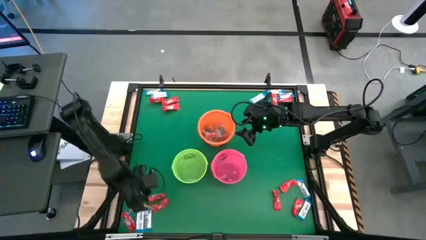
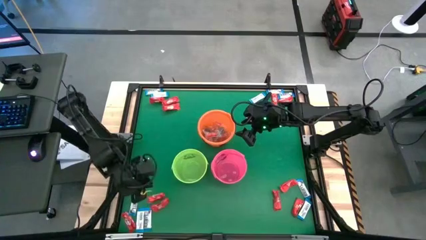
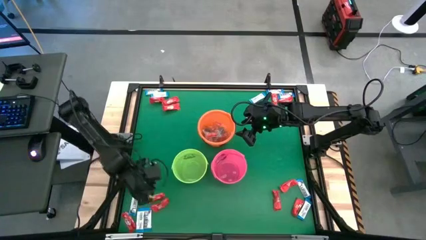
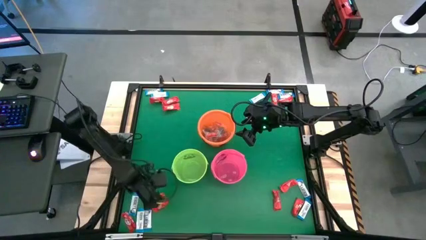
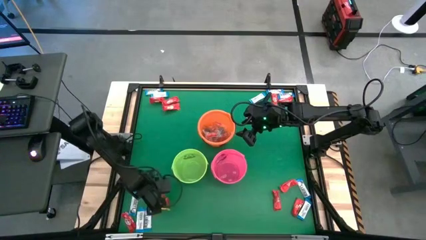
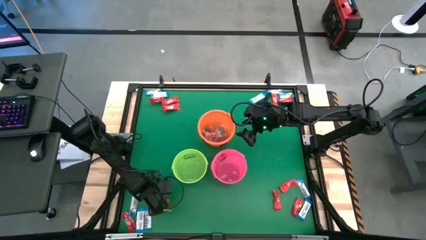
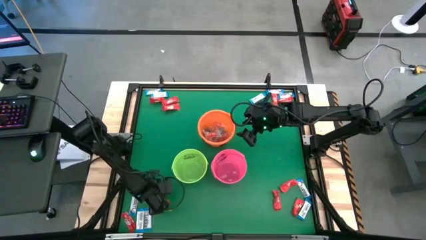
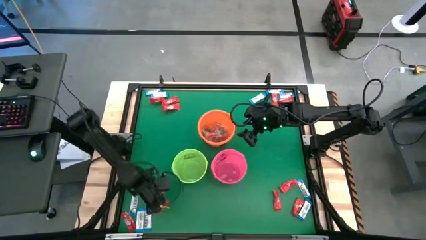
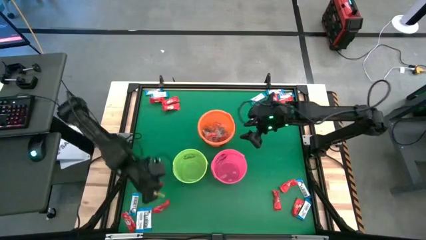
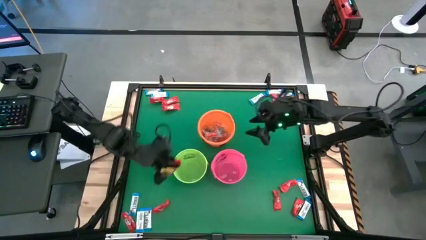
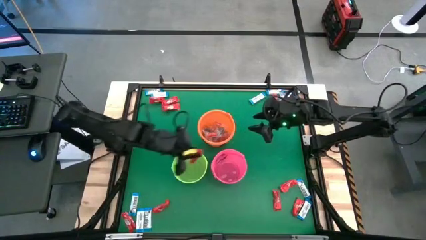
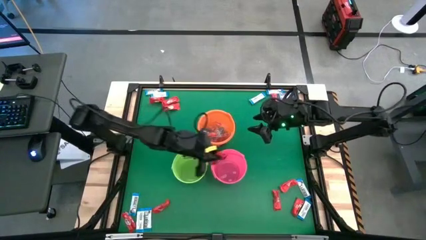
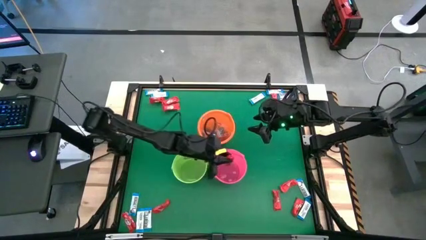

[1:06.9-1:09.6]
Task: Sort candy by brand, put in halloween buckets
Put the red chocolate bar into the pink bucket

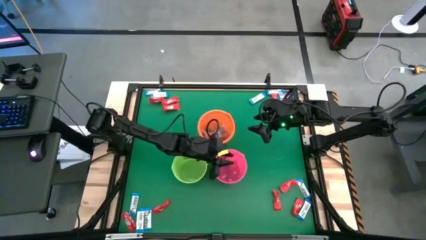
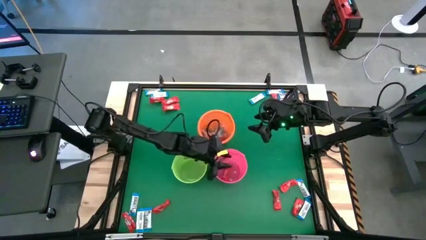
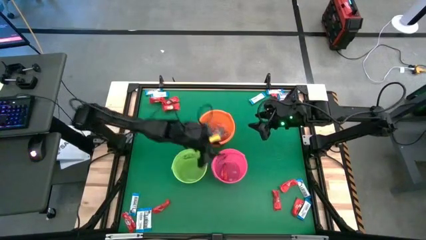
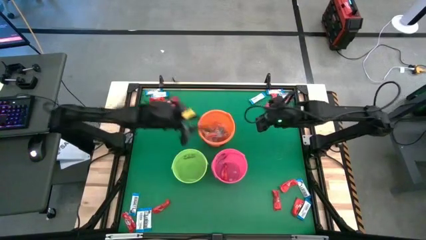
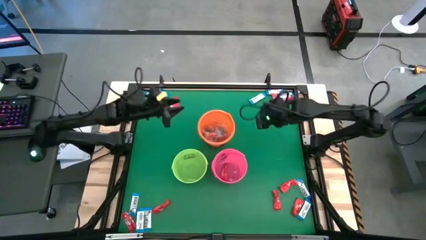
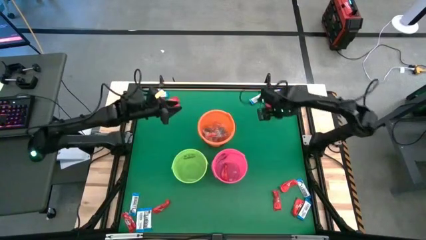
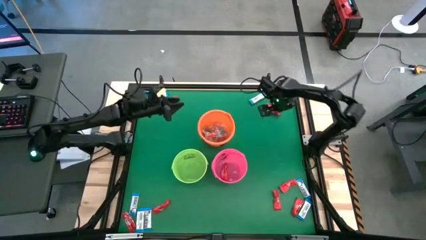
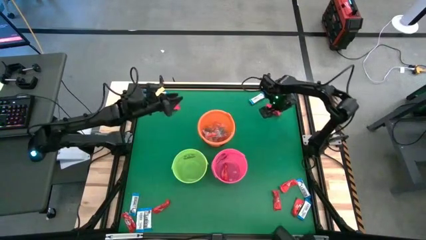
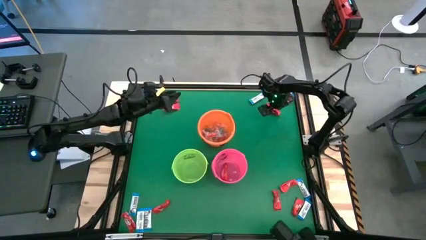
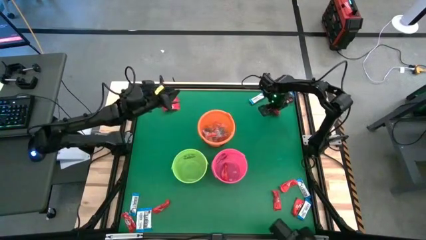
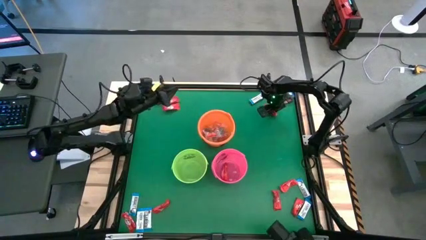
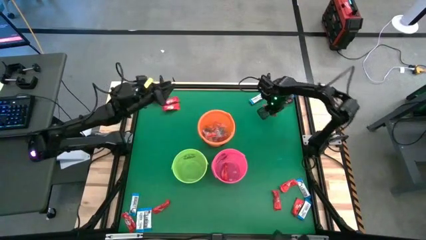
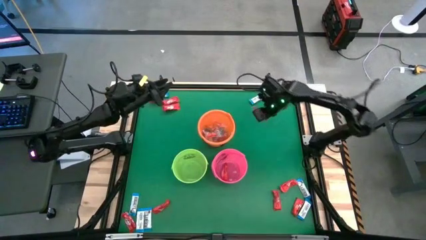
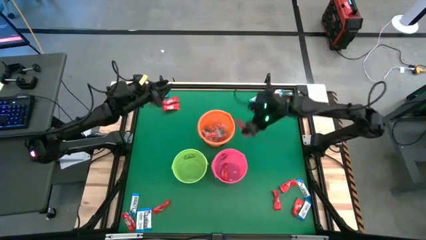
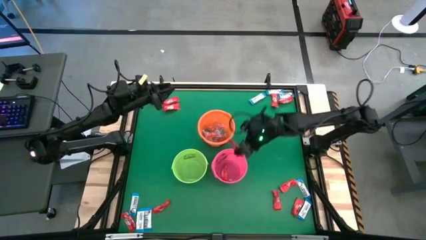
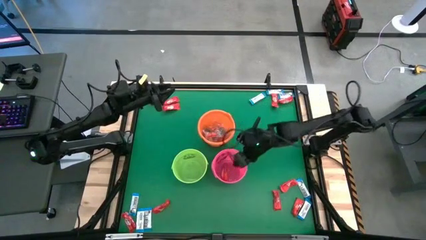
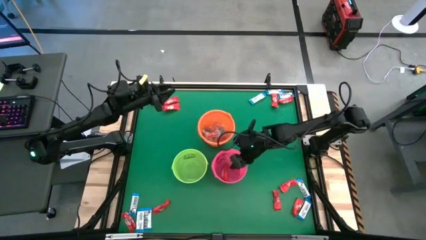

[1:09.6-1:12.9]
Put the red chocolate bar into the pink bucket

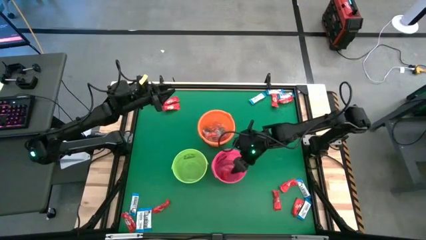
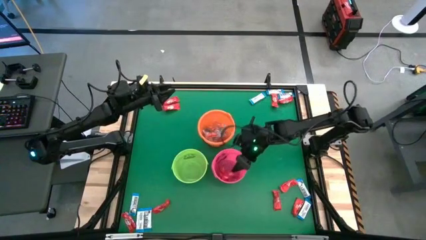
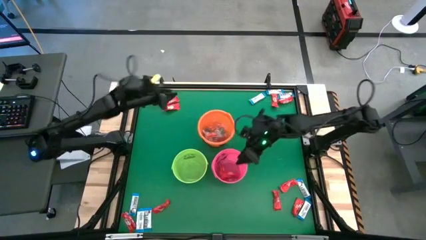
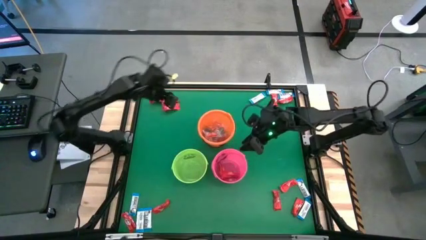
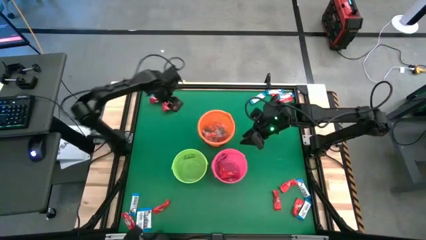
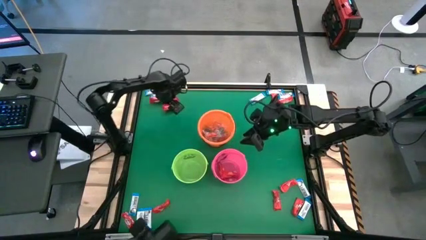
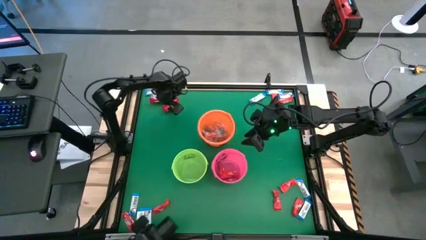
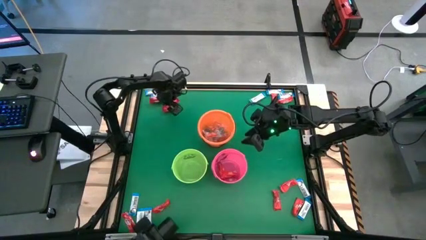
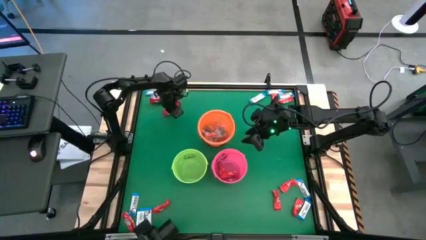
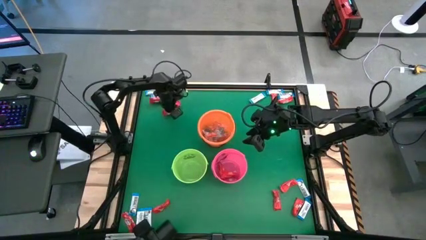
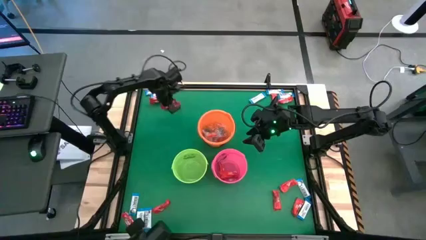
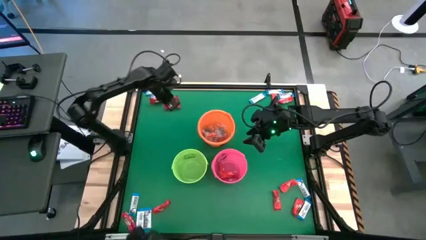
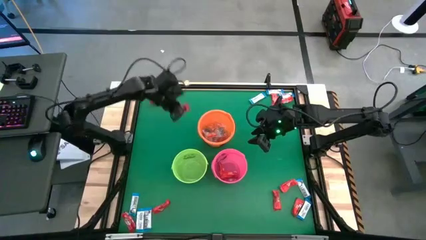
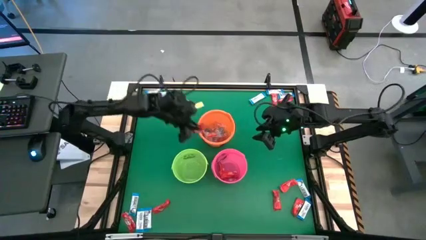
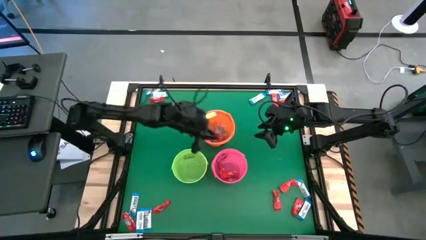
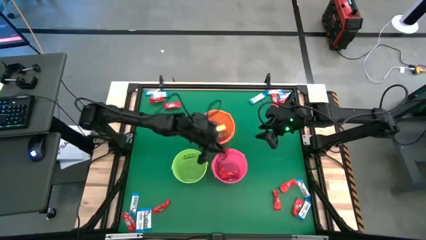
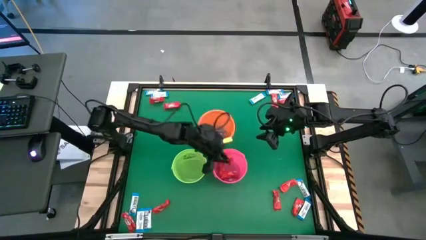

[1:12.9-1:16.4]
Put the red chocolate bar into the pink bucket

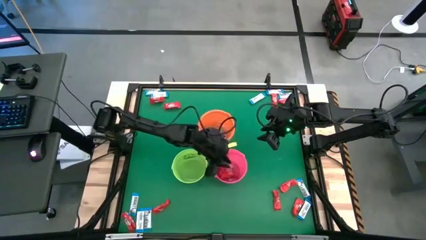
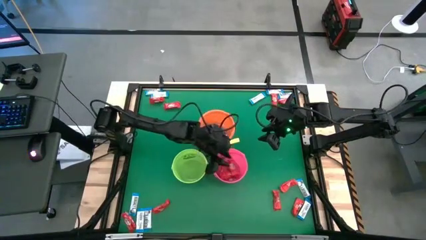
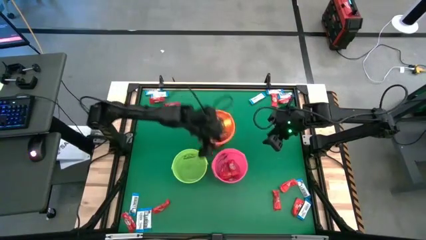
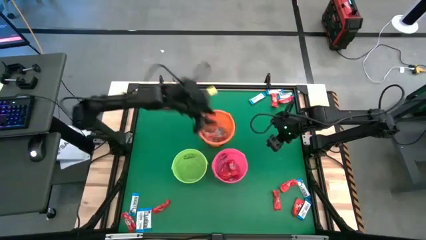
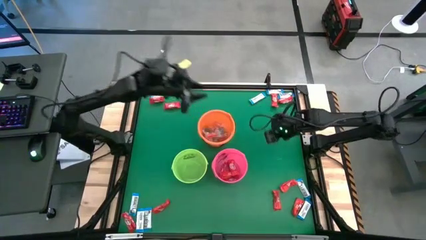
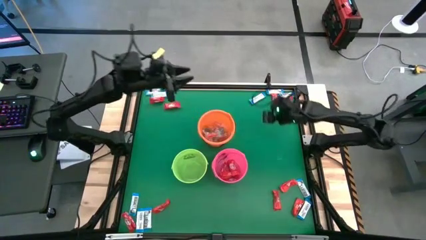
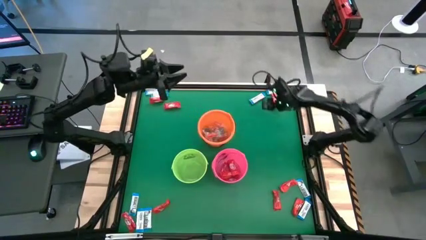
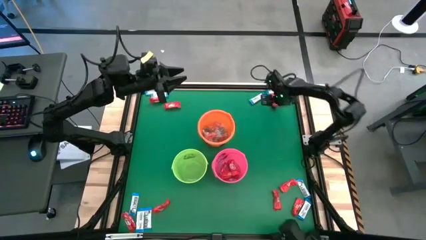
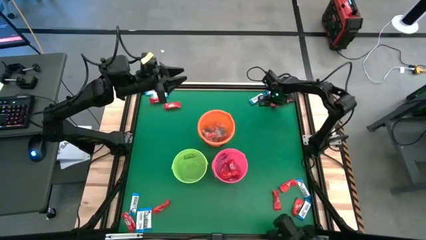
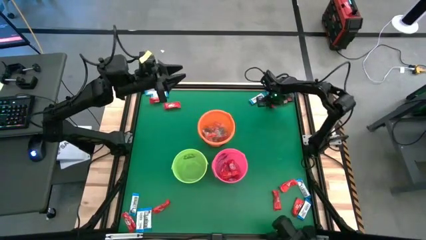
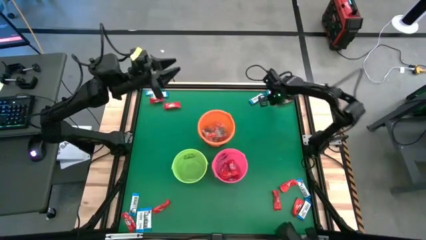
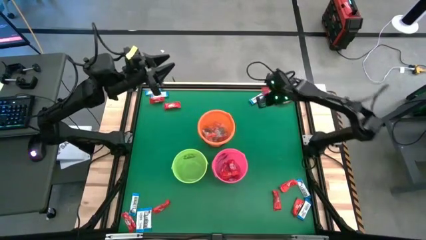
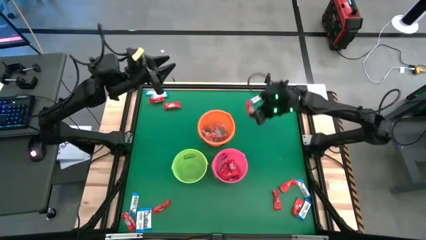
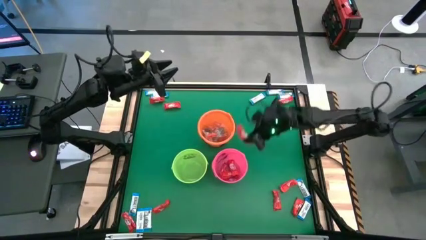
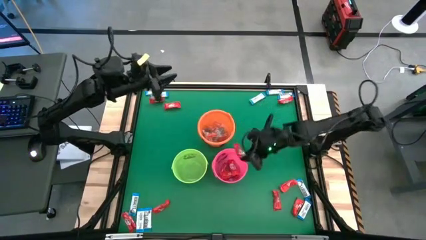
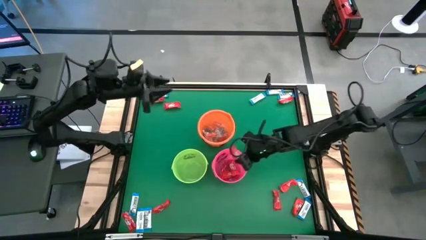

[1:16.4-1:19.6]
Put the red chocolate bar into the pink bucket

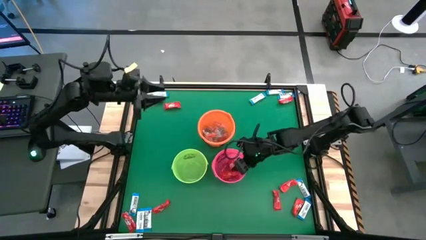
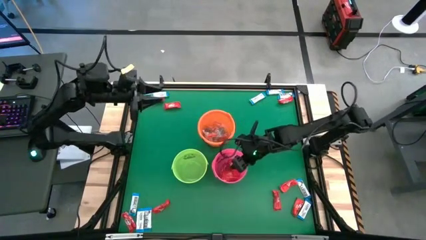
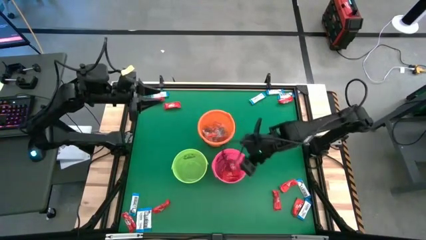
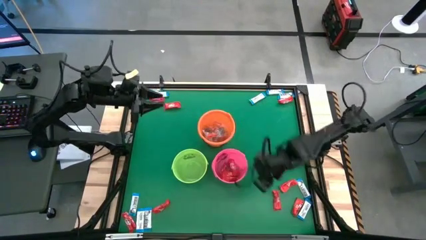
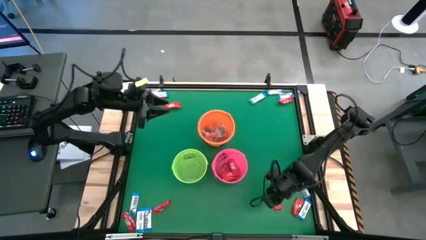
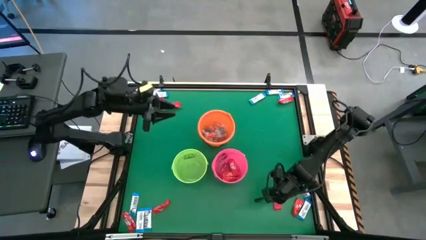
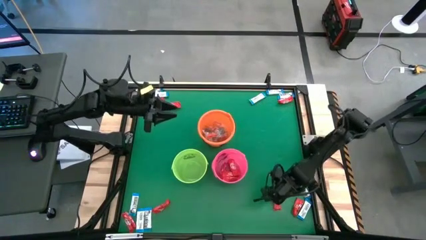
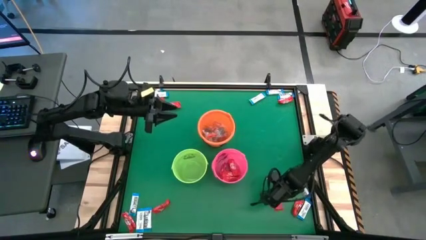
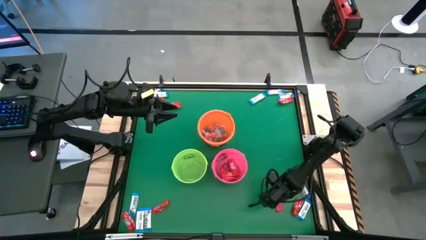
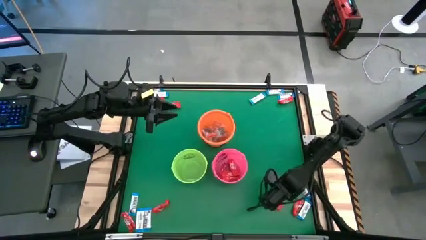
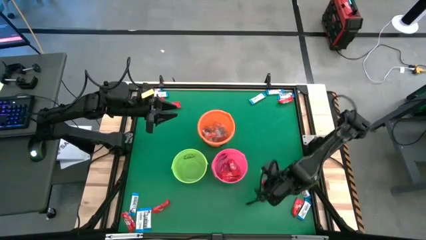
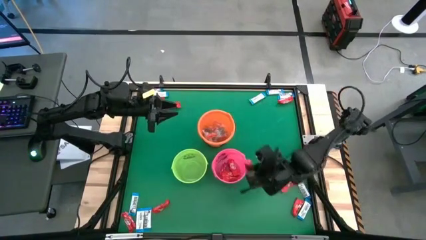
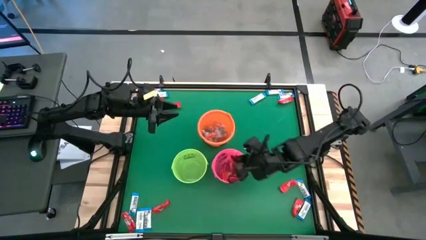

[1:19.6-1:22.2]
Put the red chocolate bar into the pink bucket

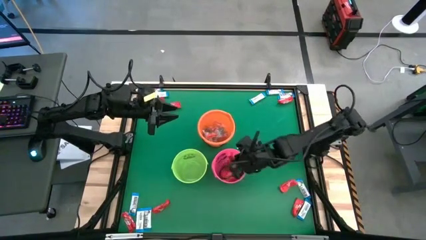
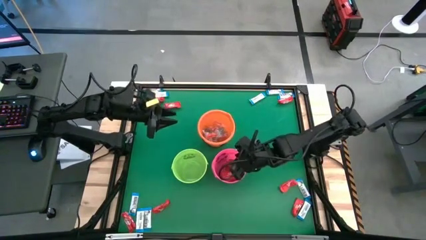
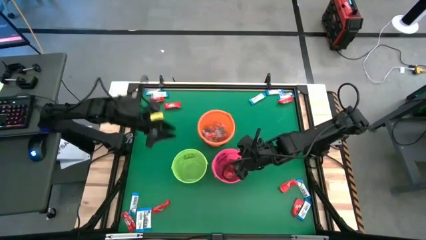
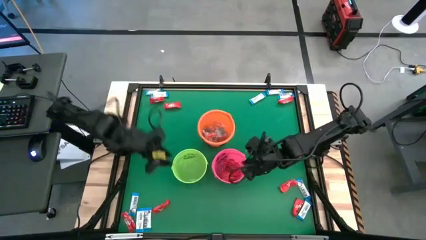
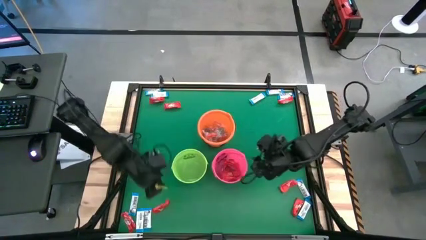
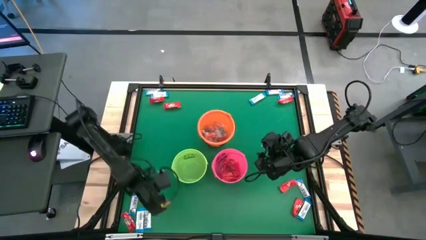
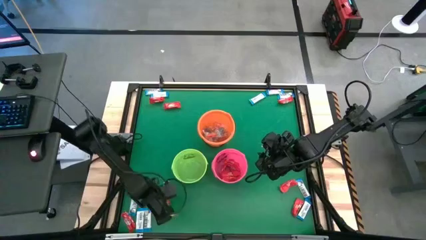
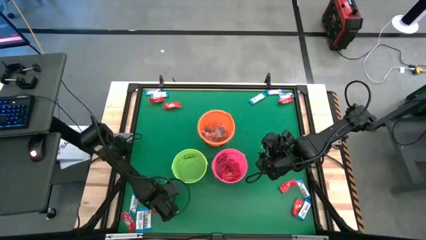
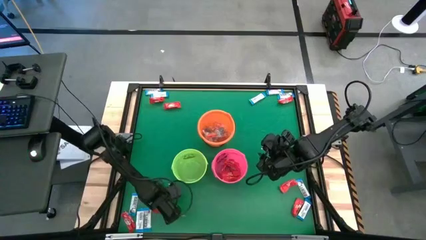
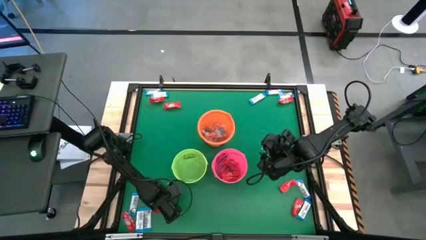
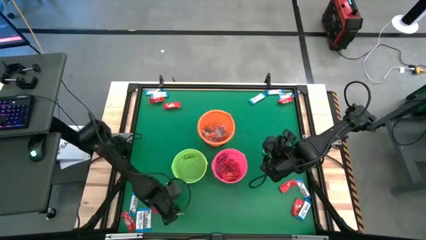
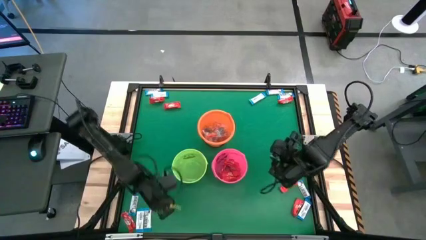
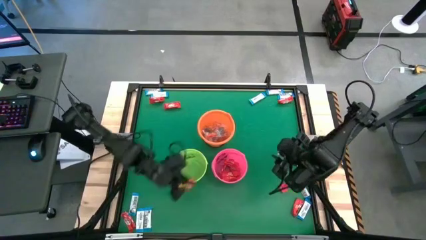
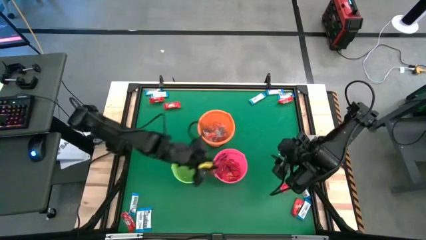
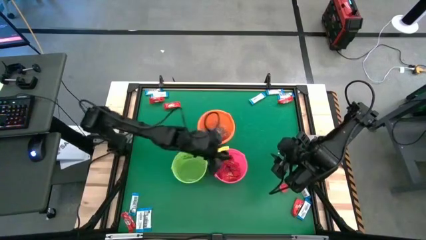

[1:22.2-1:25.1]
Put the red chocolate bar into the pink bucket
